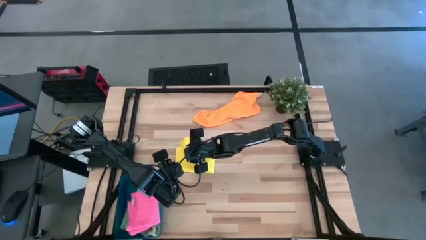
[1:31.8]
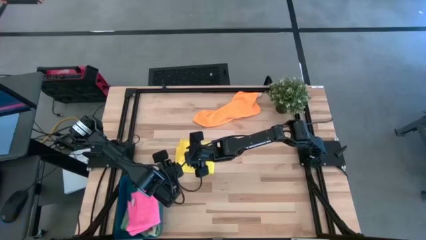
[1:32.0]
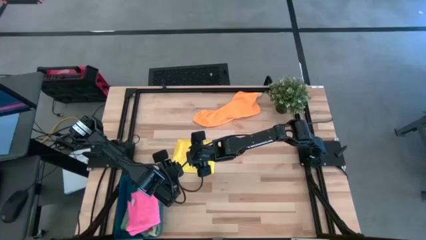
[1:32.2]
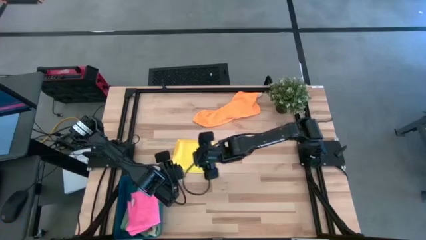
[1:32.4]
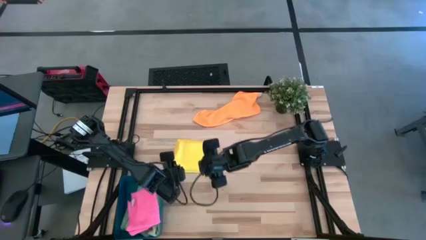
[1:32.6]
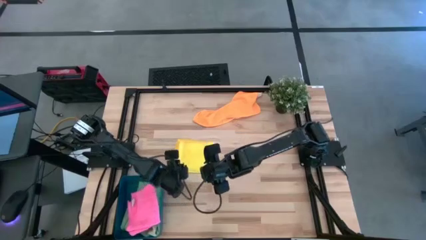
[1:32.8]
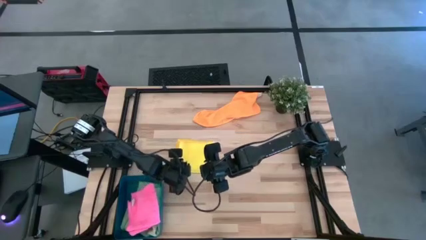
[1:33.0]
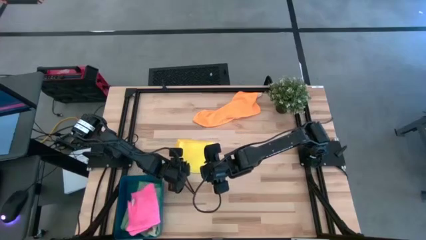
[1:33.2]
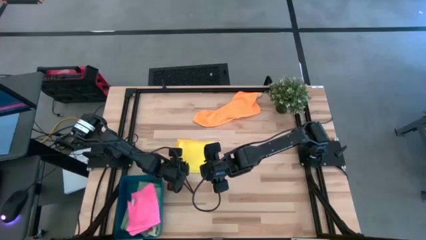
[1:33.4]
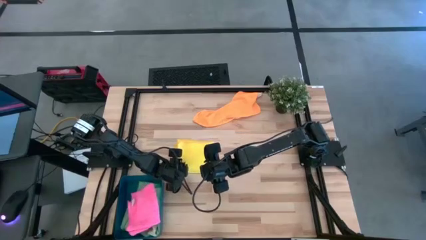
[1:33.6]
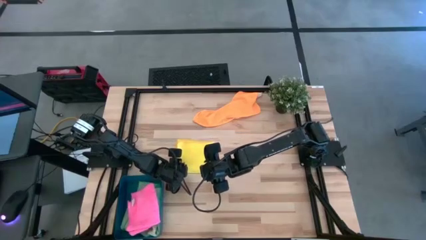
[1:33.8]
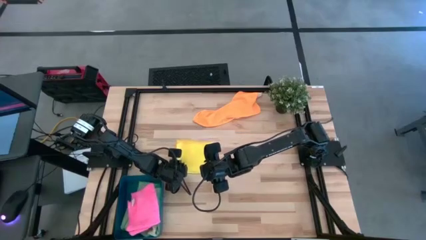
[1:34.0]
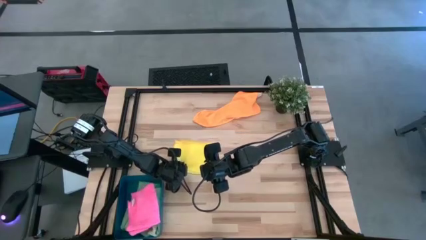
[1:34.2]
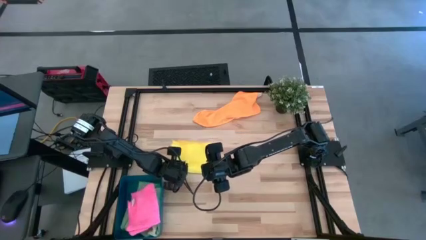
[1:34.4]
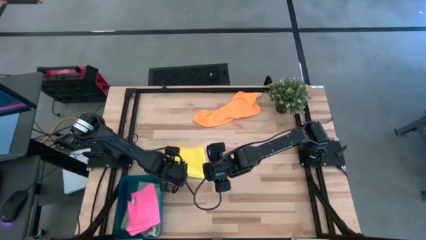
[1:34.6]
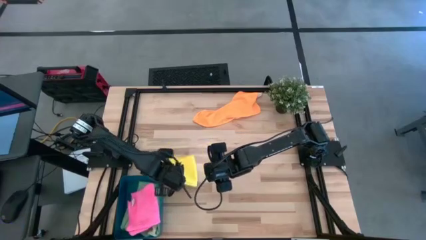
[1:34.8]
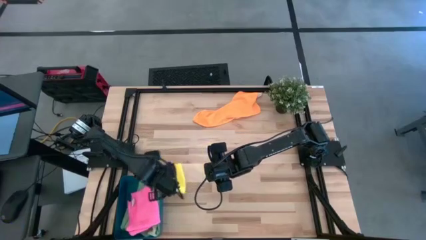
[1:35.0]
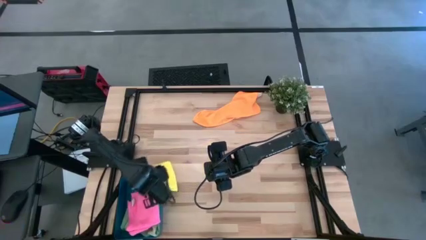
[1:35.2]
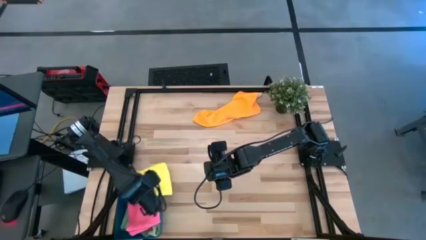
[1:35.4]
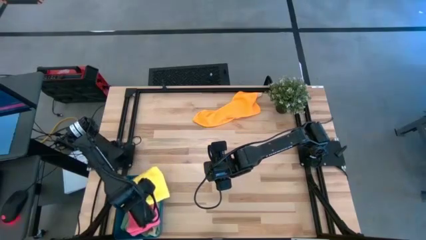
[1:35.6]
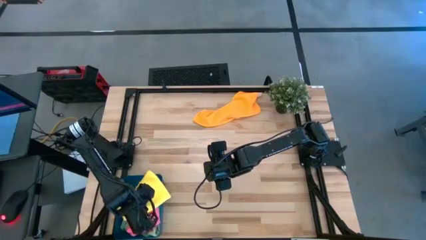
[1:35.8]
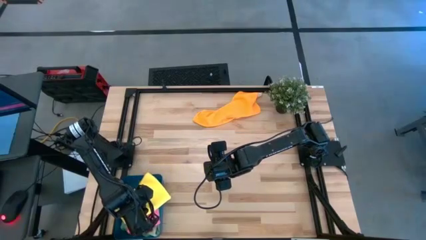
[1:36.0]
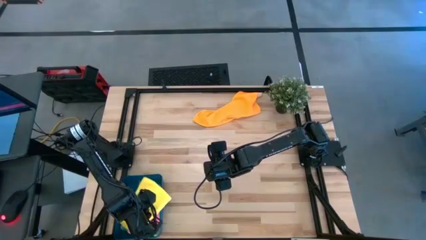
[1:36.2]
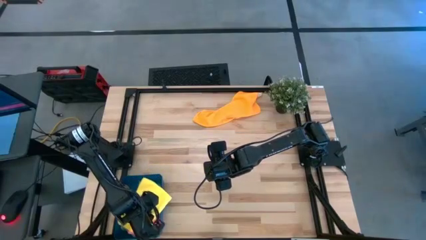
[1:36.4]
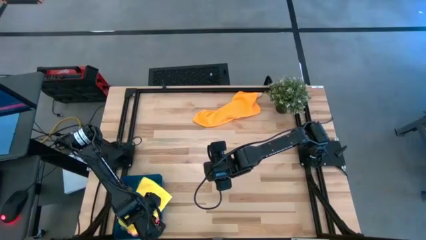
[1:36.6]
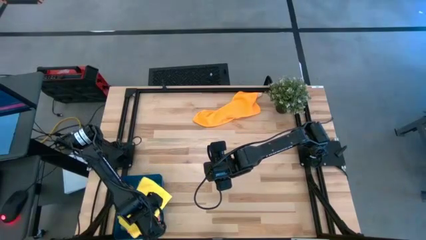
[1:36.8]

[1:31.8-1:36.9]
Task: Fold microfiber towels
Put the yellow microfiber towel into the bin

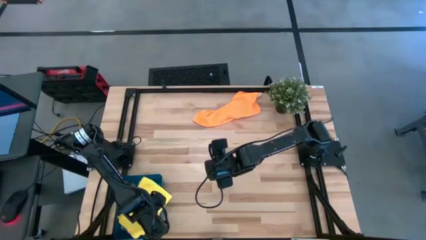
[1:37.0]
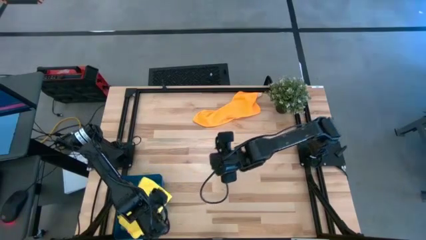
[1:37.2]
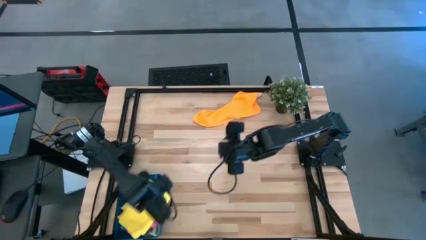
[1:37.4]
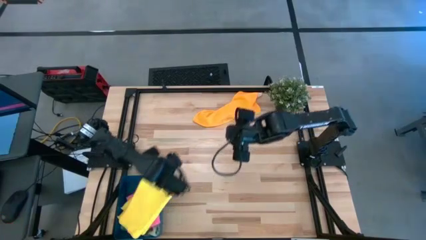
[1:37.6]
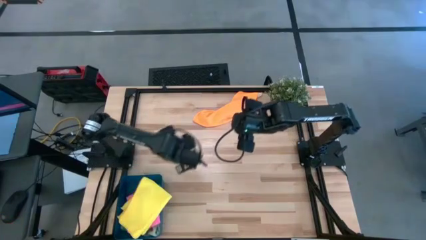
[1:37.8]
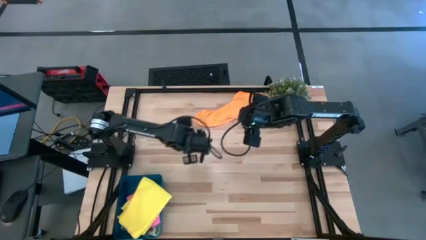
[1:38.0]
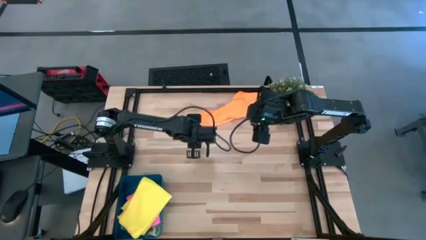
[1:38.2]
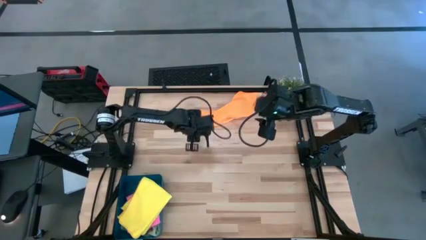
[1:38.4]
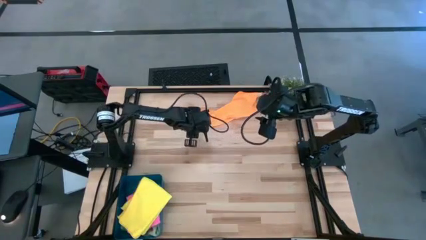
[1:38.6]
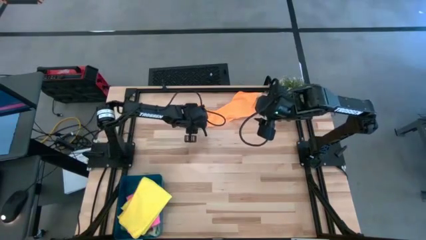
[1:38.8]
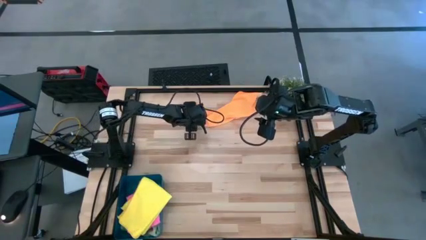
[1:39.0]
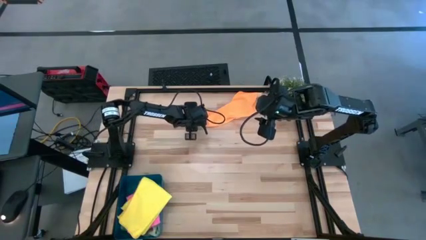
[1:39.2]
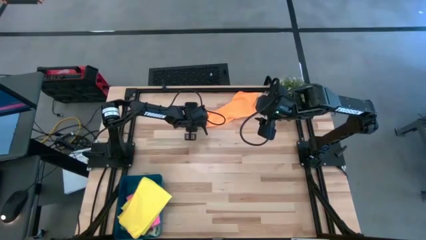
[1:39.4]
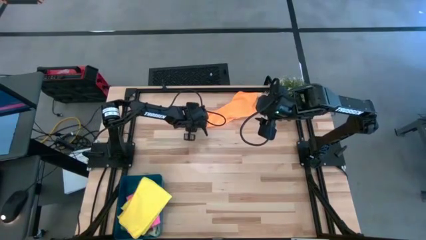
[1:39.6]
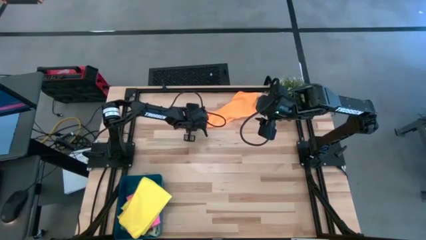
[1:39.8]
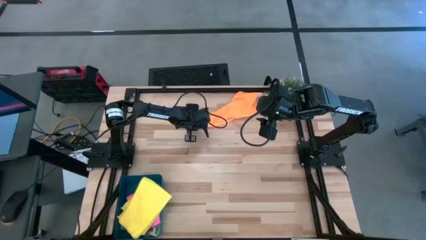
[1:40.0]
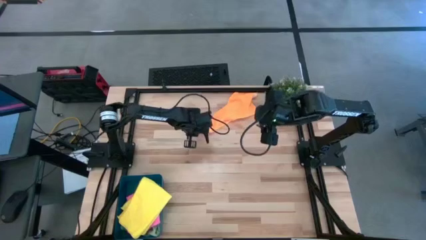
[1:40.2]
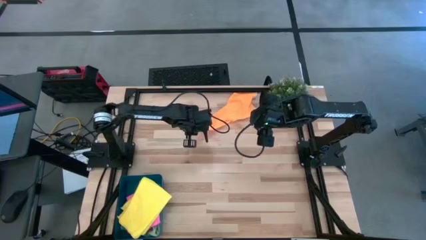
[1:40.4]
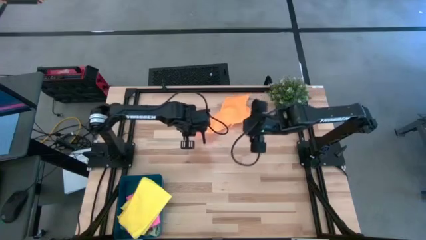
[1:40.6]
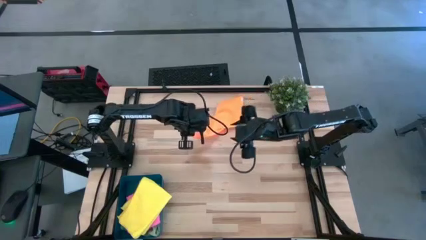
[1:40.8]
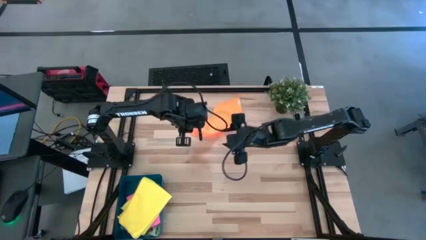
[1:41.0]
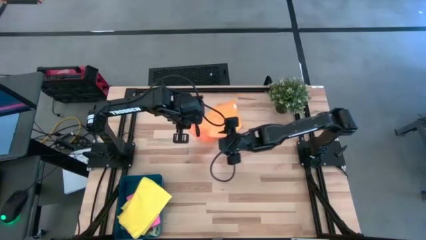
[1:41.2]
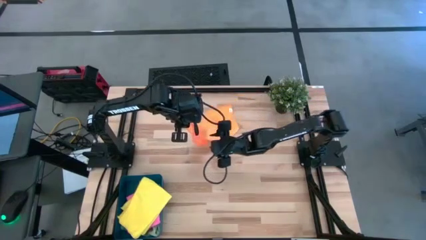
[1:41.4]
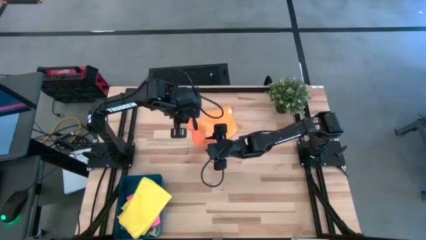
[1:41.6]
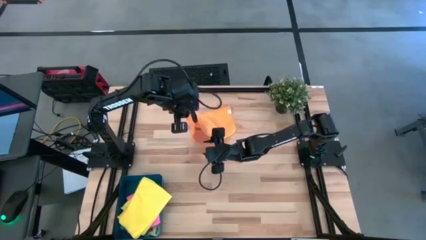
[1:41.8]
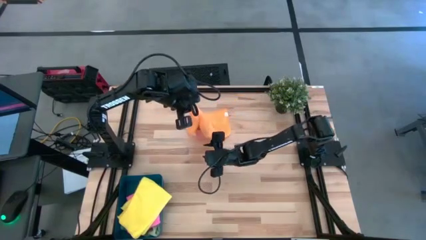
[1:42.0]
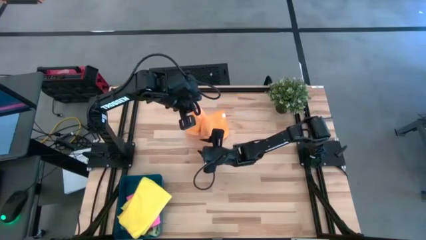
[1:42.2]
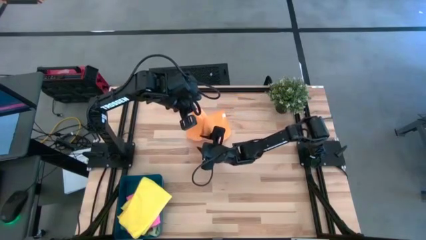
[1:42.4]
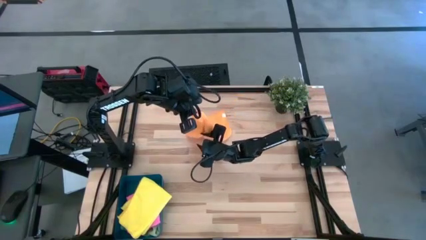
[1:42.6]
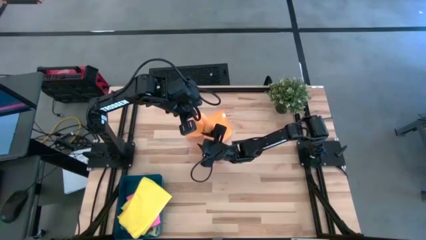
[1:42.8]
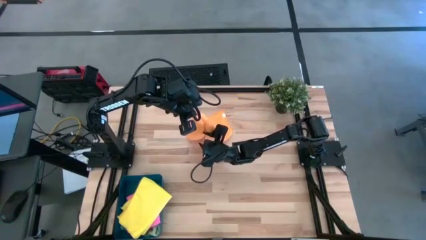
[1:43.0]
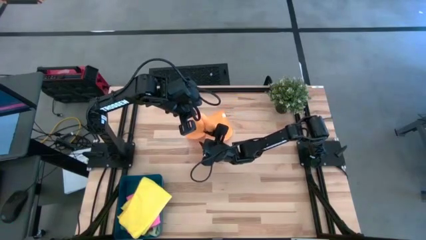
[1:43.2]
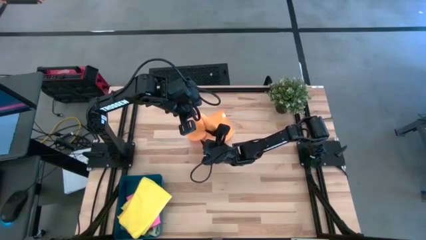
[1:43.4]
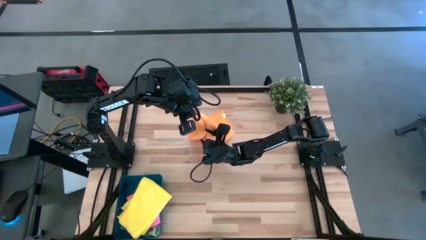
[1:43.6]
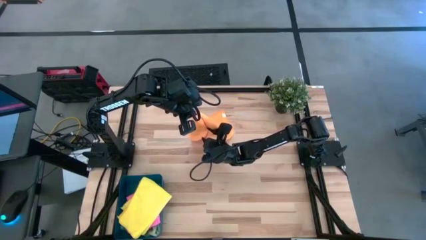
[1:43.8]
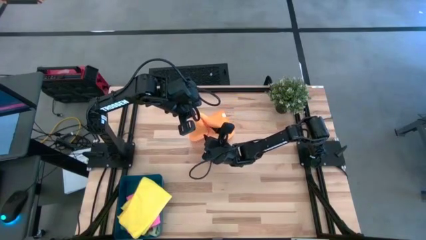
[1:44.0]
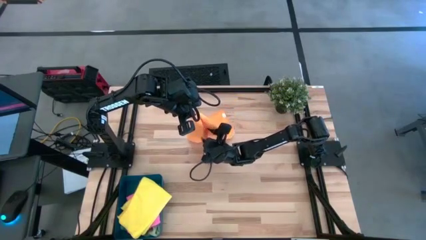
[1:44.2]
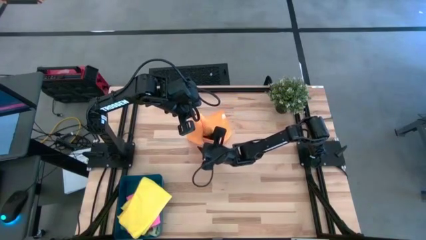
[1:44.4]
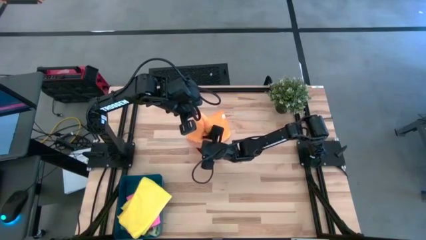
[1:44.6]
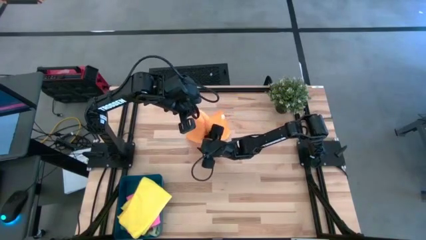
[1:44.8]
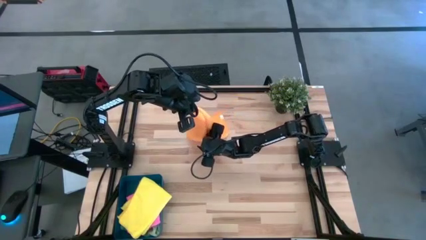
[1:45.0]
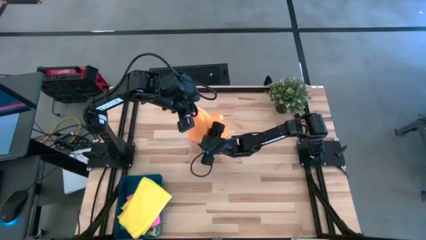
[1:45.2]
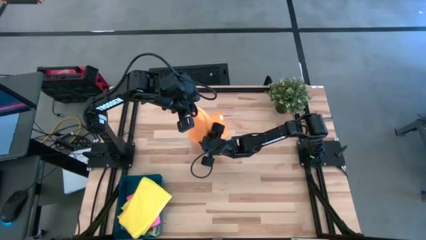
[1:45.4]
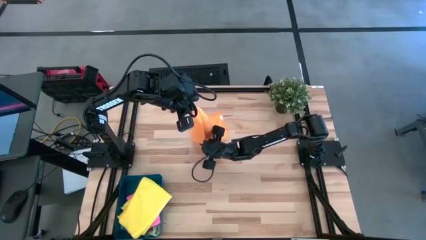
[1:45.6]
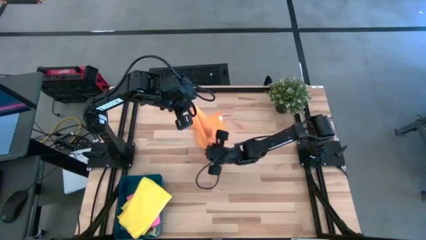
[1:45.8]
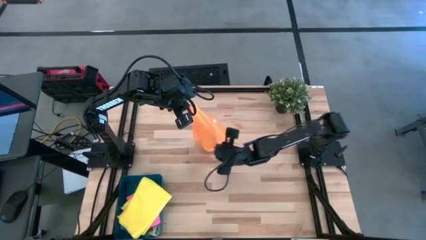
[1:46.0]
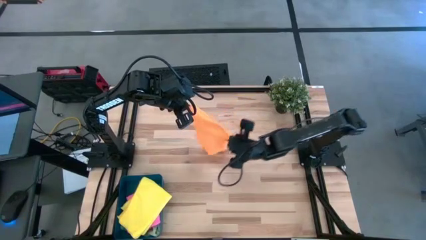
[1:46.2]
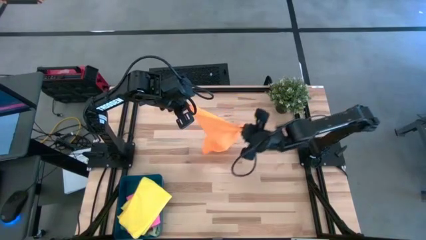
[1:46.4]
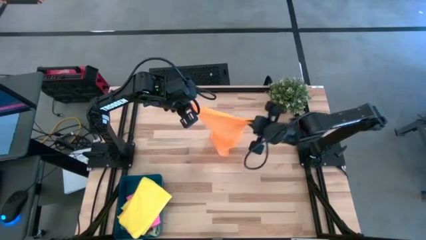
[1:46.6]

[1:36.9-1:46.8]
Fold the orange microfiber towel

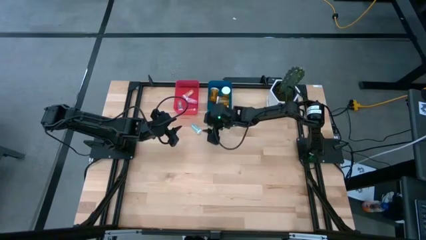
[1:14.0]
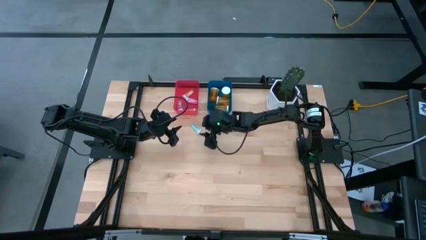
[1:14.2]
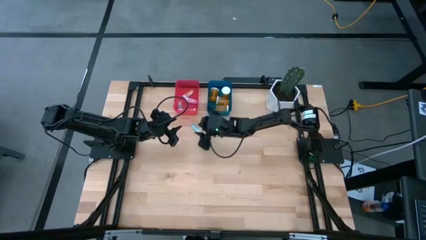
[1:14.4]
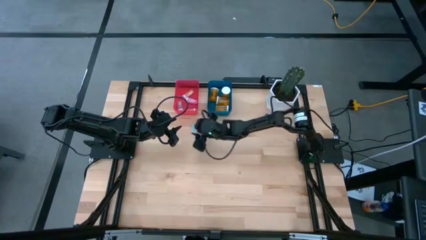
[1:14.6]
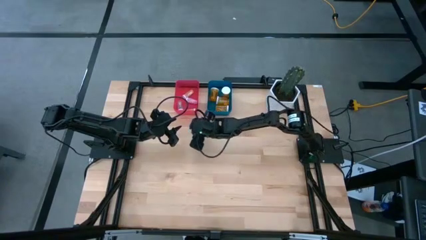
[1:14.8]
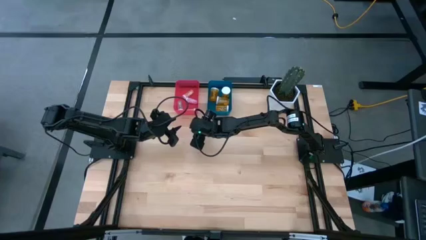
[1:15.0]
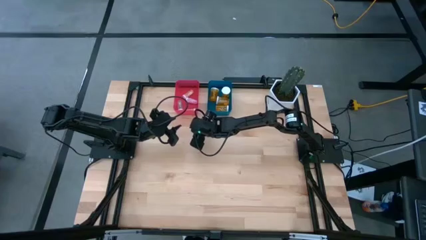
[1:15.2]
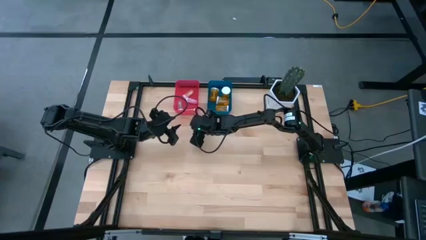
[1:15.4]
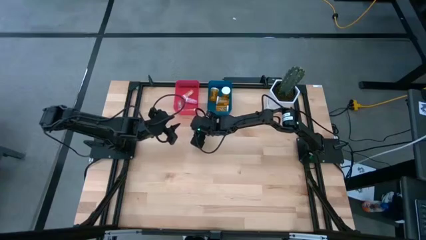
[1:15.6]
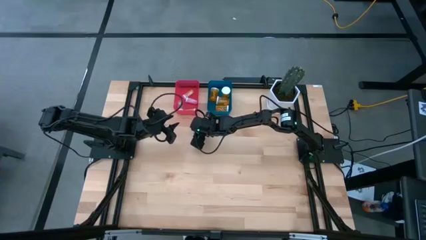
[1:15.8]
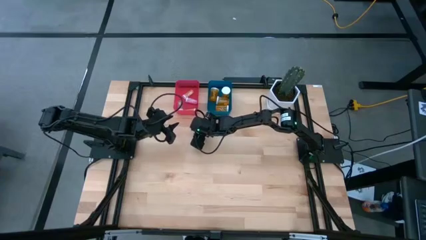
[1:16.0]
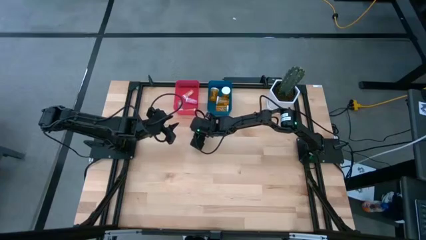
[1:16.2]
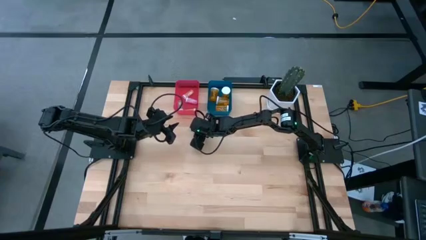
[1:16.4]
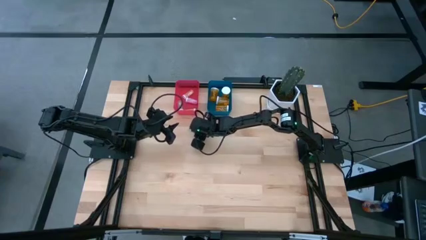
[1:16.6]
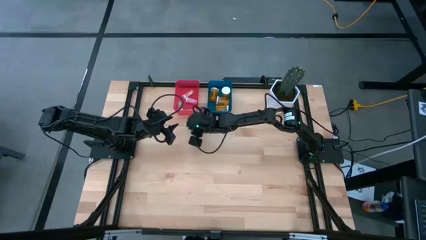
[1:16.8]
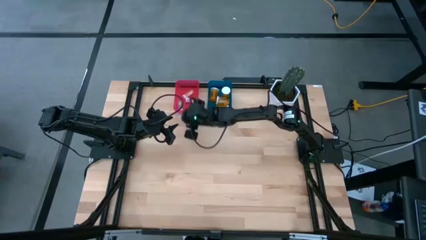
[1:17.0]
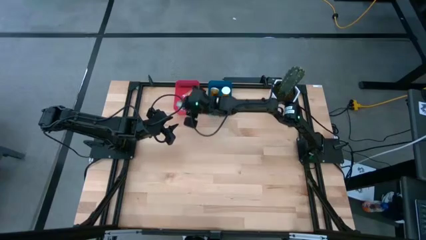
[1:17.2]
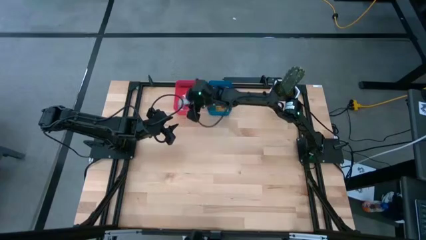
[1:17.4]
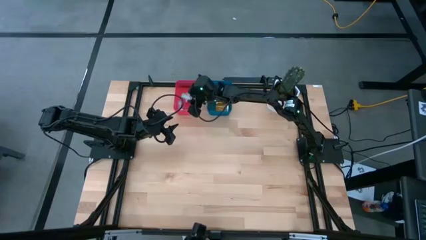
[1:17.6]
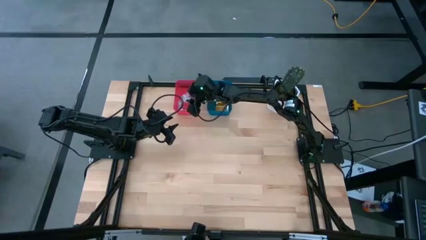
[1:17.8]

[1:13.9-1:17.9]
Task: Pick and place medicine bottles into bin by pill shape (circle, oval)
Put the blue tablet bottle into the red bin
